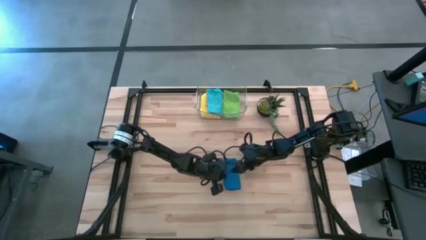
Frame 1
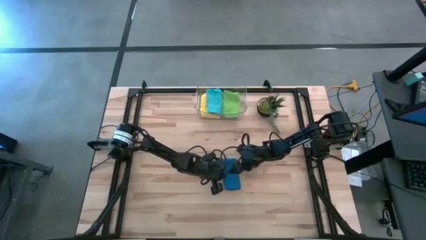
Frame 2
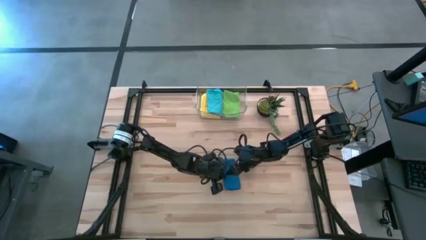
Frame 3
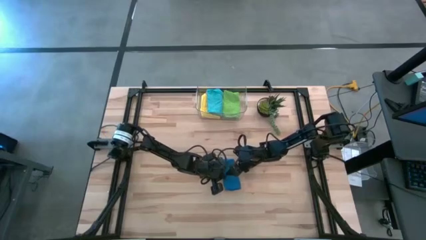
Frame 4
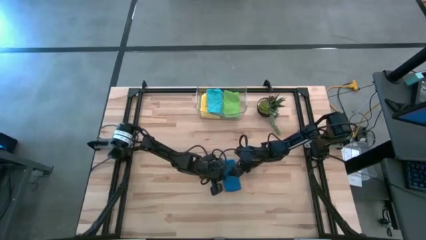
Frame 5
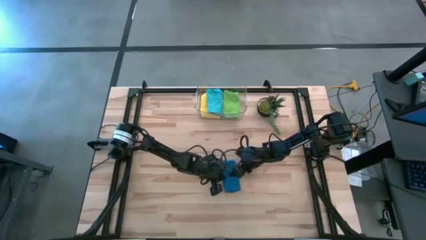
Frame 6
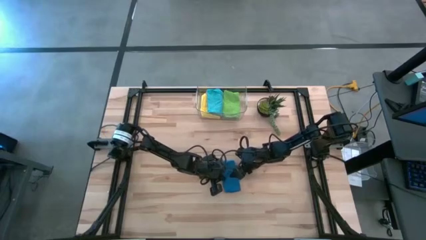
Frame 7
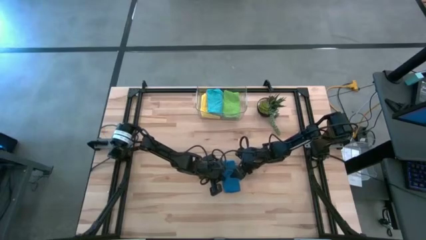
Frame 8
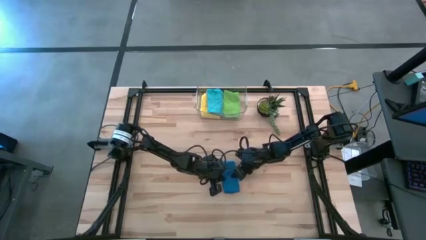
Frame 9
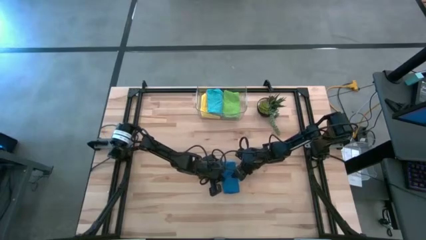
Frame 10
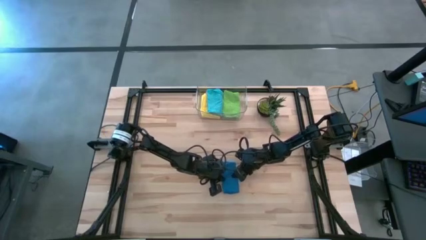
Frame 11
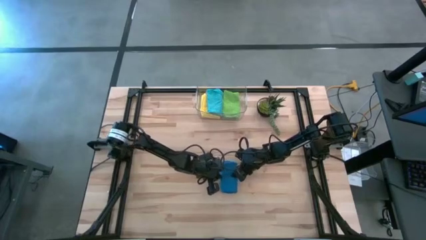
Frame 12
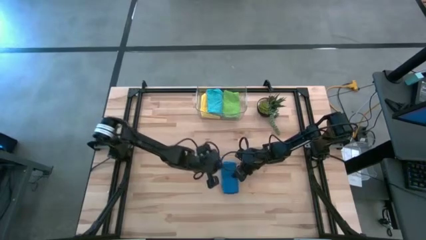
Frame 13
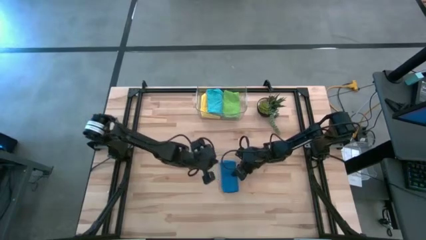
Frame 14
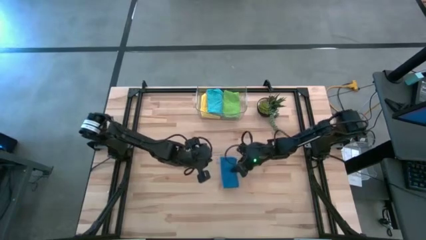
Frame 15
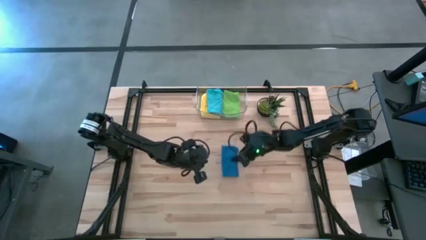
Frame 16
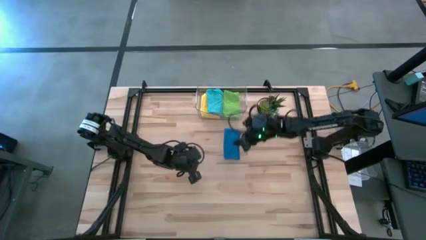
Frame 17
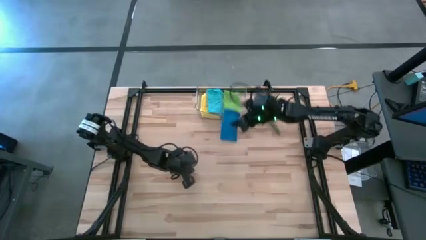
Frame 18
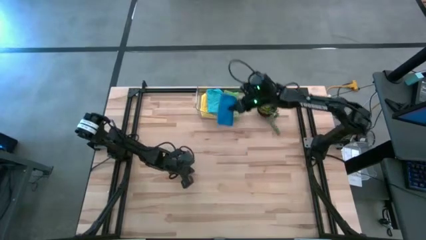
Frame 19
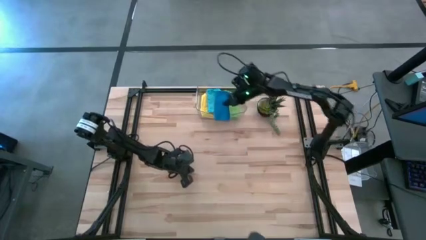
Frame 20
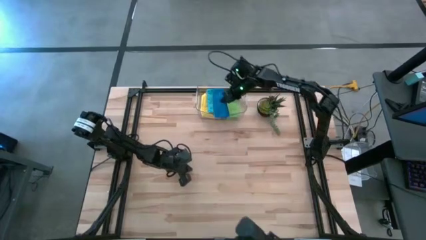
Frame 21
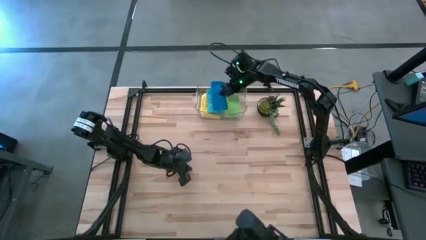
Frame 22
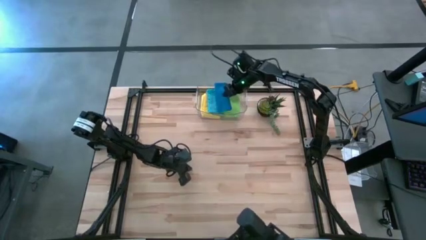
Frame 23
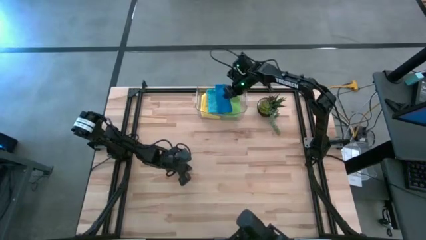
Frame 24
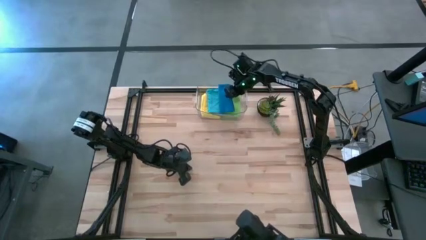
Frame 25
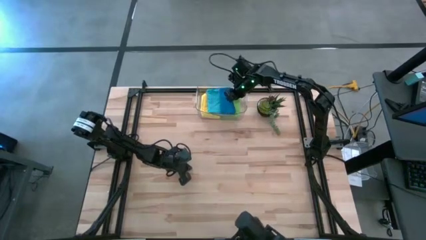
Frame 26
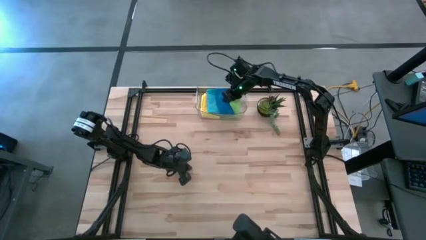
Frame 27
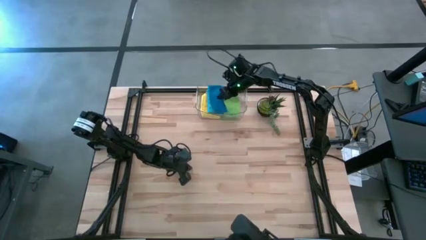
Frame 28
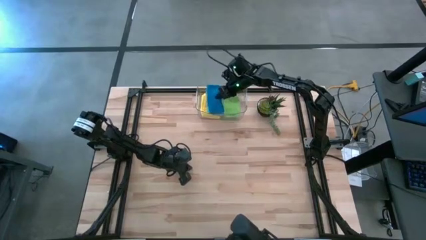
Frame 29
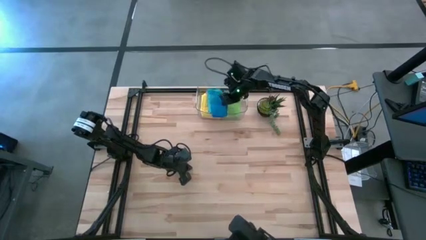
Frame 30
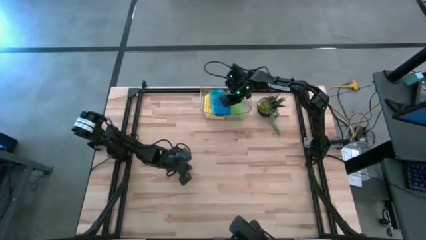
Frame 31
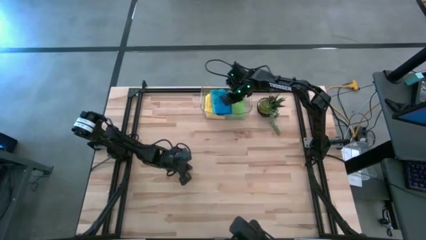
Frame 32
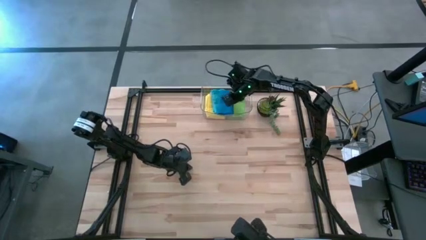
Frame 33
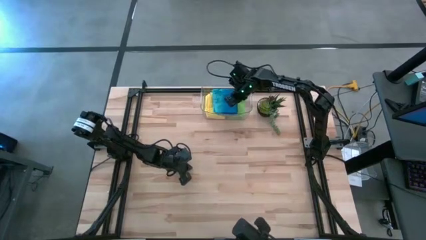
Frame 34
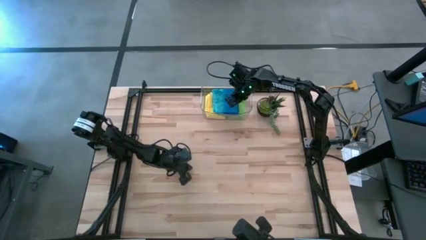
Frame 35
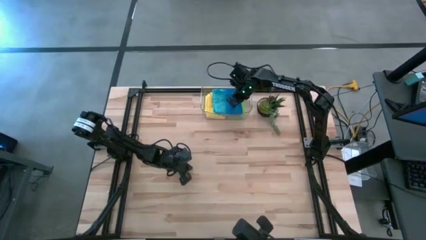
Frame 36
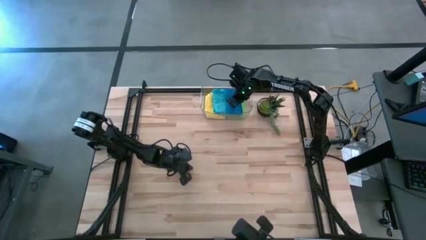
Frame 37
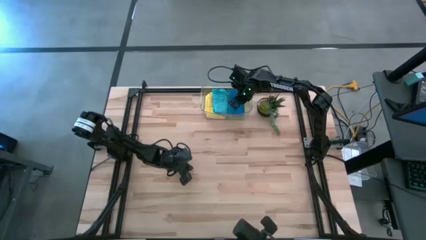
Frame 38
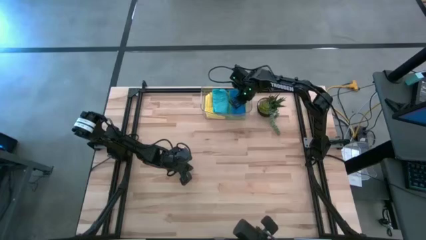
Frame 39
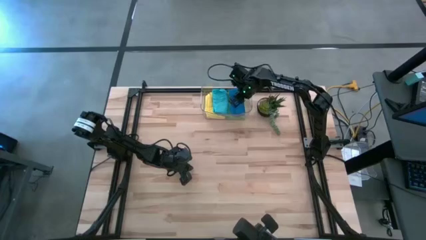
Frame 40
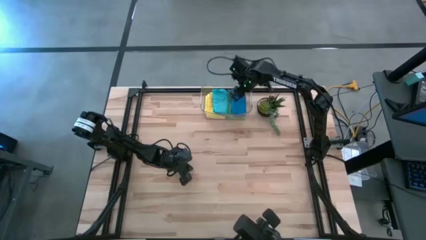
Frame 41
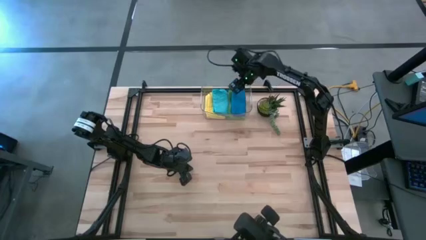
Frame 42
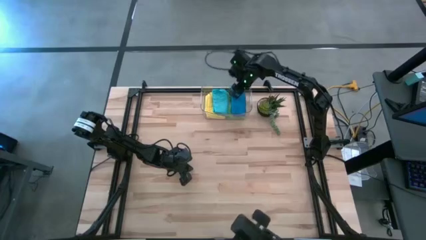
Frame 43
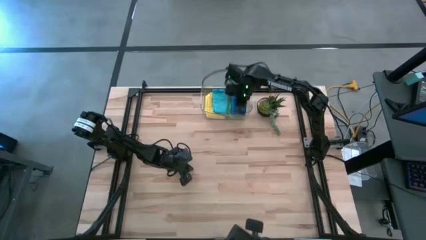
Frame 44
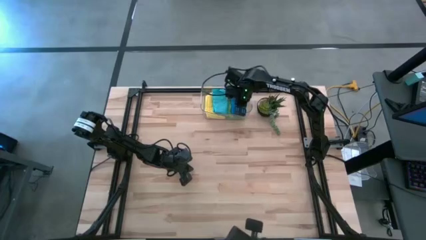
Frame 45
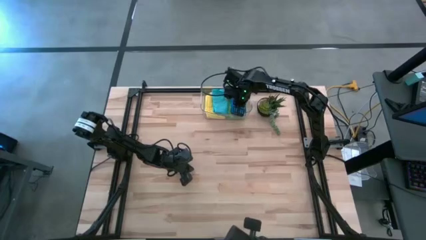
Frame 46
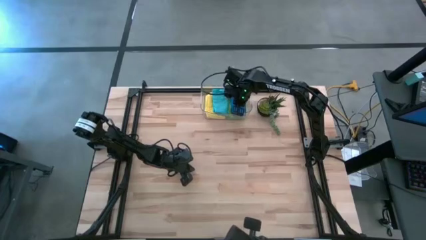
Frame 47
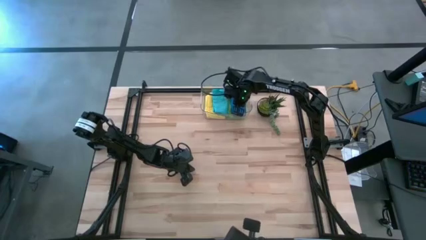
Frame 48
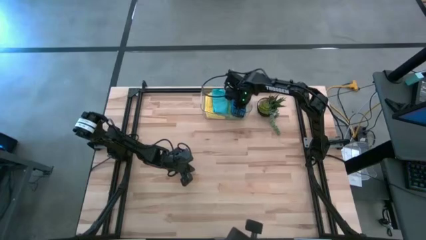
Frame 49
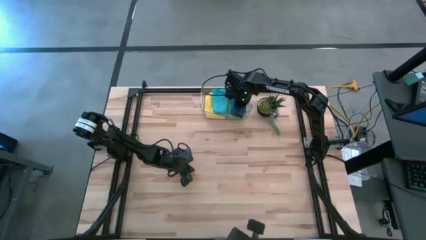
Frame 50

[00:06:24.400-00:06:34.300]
Task: Fold microfiber towels
Put the dark blue microfiber towel into the transparent bin

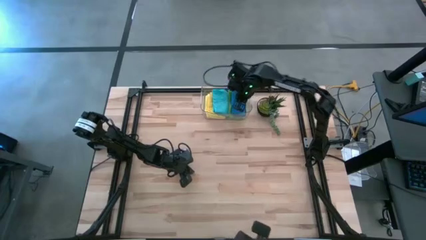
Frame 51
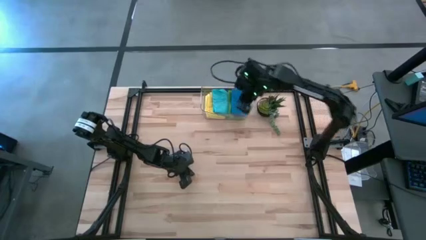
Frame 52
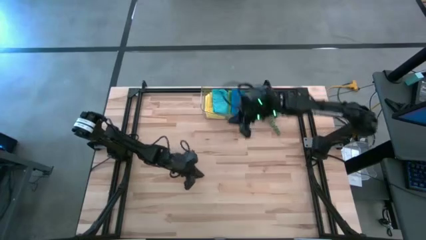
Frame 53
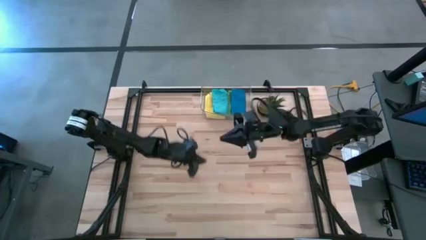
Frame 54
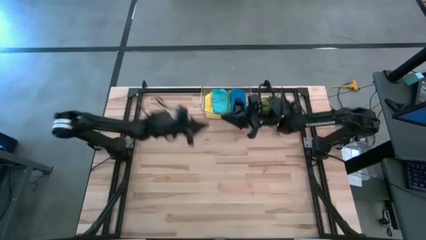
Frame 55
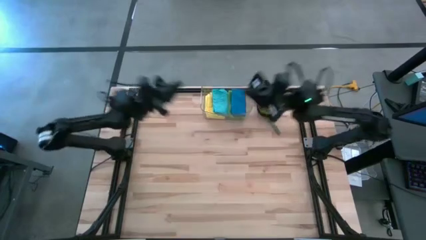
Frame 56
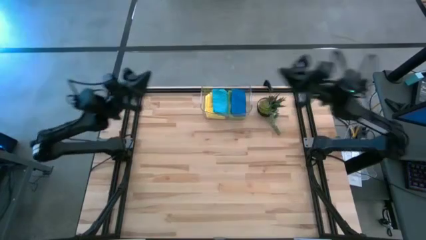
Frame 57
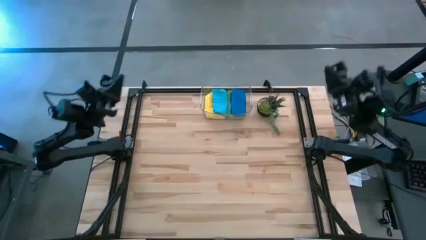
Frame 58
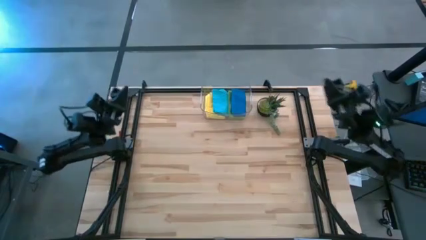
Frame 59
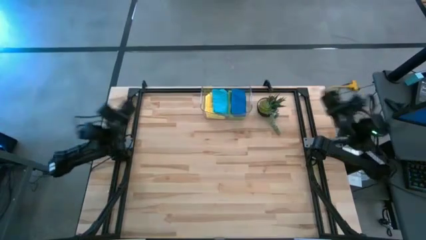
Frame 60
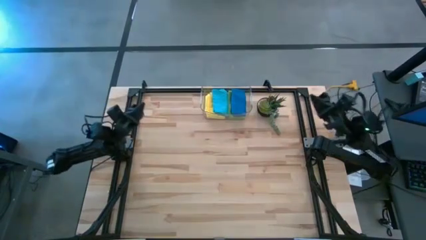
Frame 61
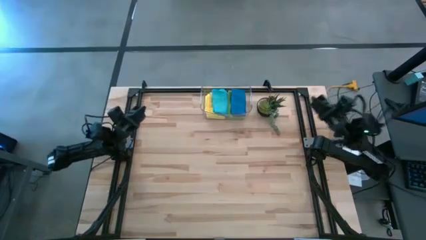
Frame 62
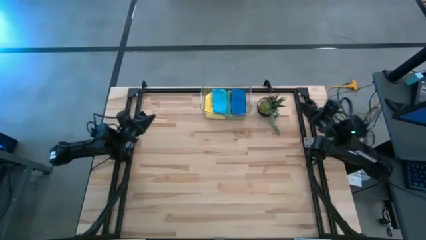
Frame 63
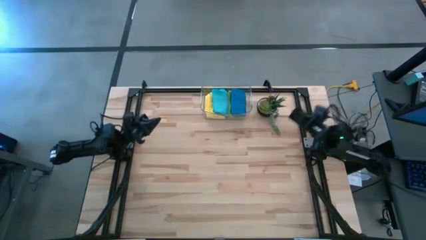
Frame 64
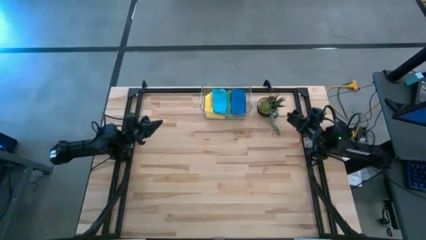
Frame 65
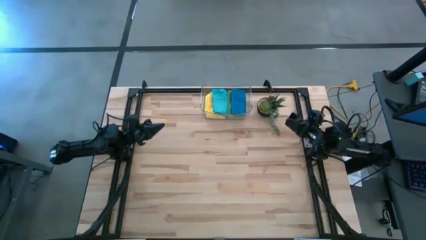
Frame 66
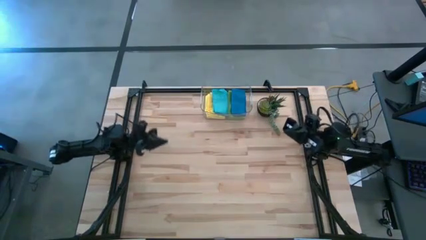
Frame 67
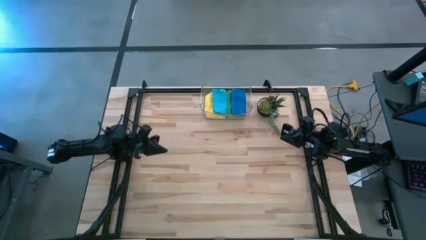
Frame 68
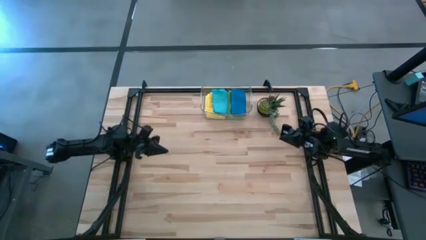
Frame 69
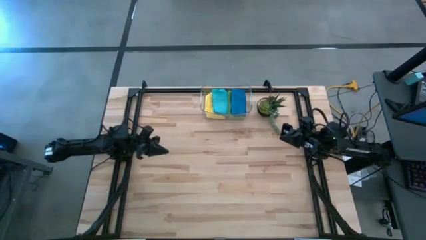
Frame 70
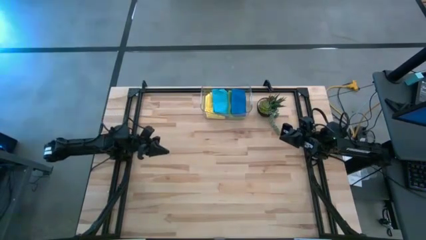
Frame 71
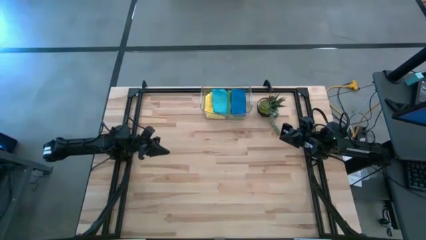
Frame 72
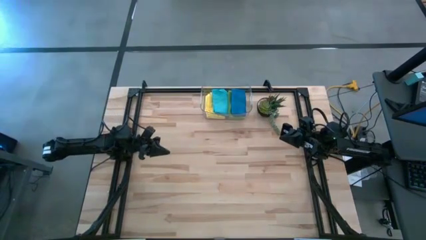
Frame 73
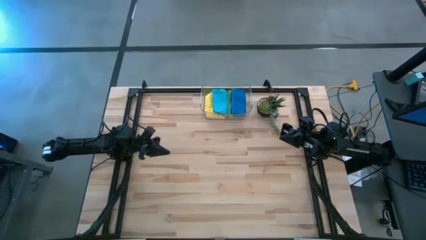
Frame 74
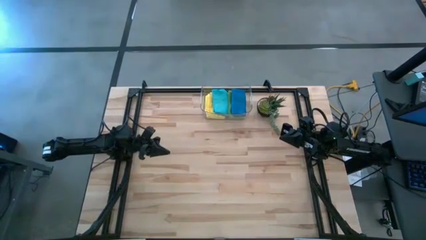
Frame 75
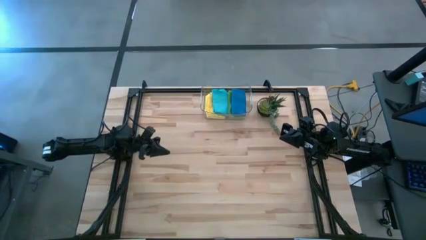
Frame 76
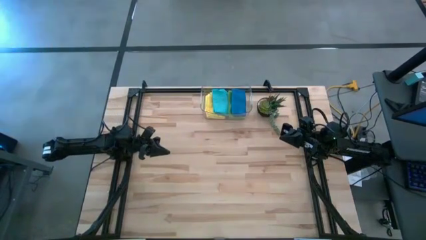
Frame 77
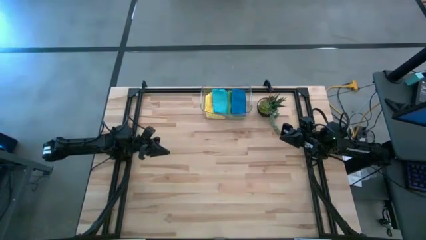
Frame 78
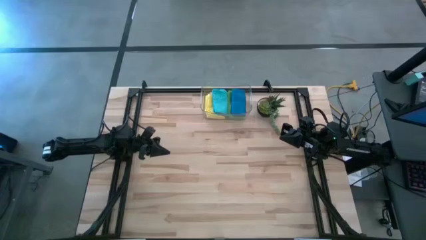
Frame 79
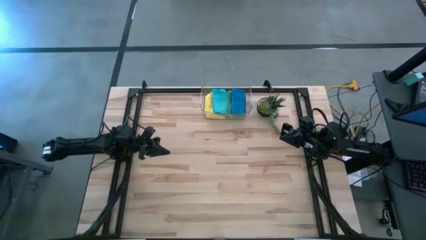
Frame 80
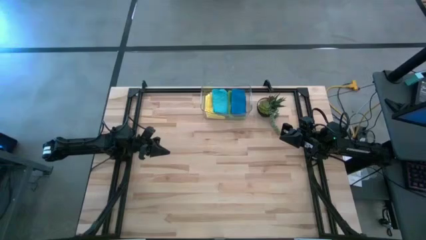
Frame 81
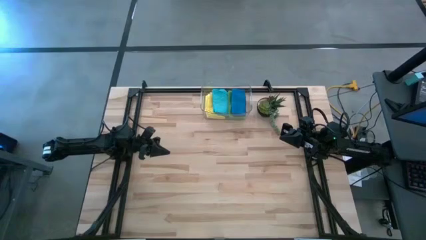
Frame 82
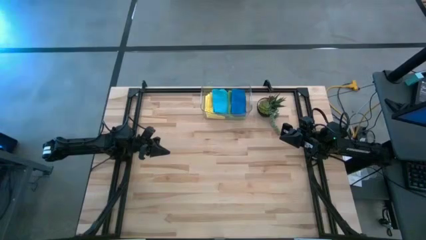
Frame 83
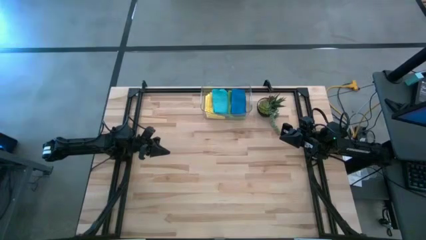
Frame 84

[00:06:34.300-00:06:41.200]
Return to Home Position
